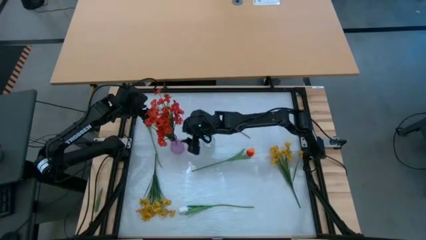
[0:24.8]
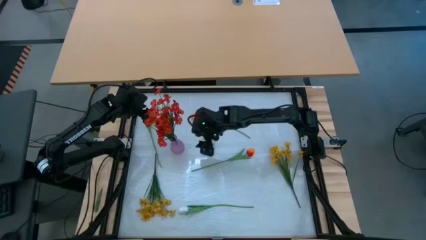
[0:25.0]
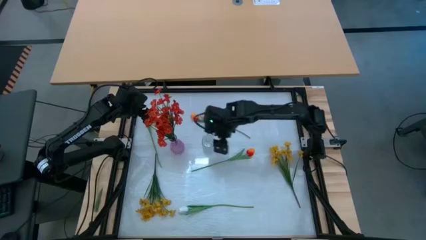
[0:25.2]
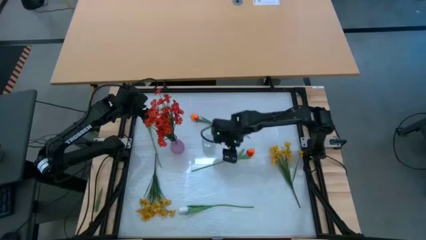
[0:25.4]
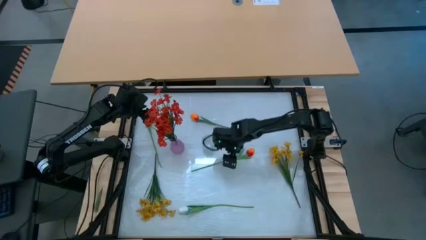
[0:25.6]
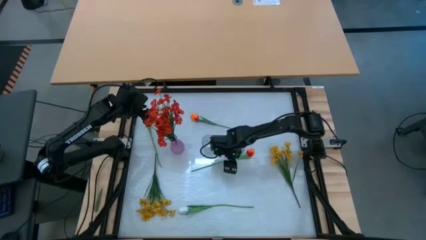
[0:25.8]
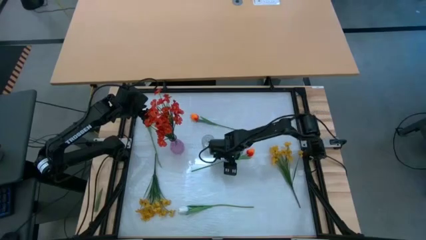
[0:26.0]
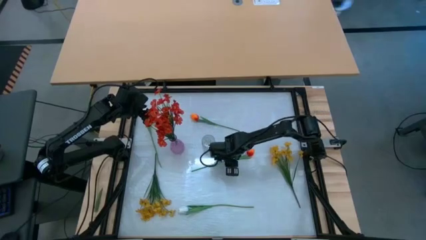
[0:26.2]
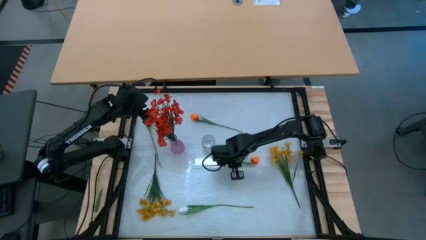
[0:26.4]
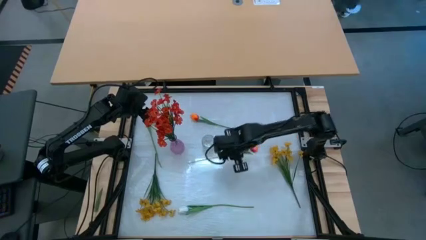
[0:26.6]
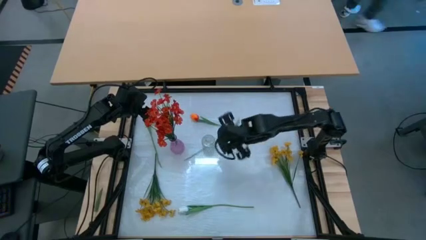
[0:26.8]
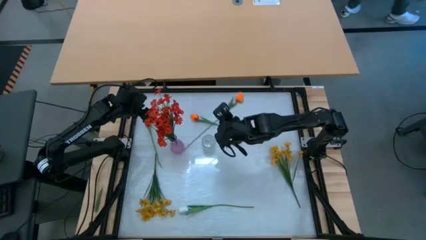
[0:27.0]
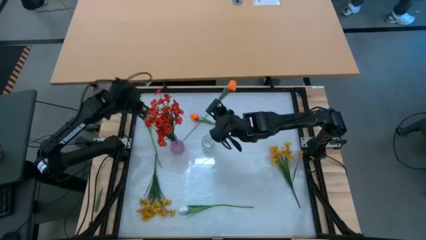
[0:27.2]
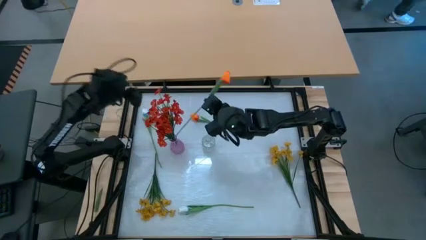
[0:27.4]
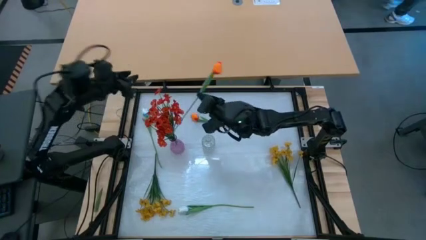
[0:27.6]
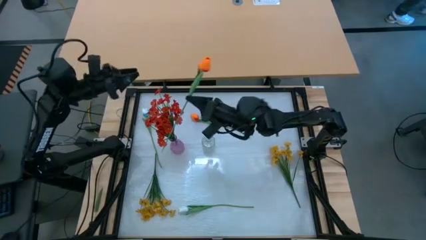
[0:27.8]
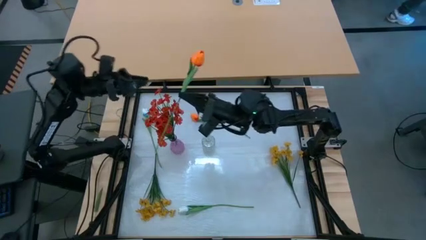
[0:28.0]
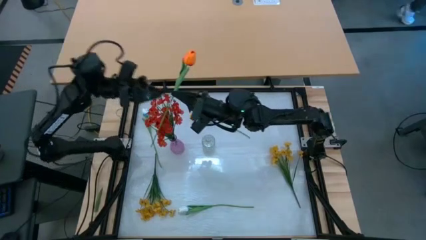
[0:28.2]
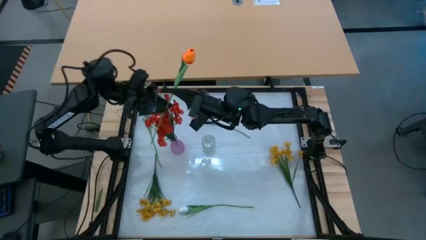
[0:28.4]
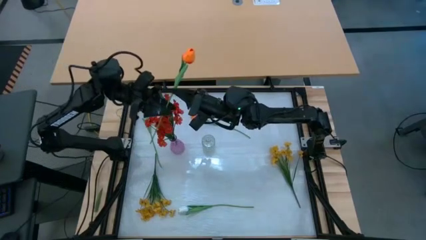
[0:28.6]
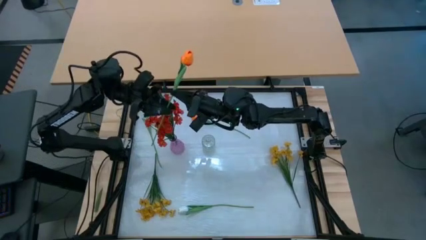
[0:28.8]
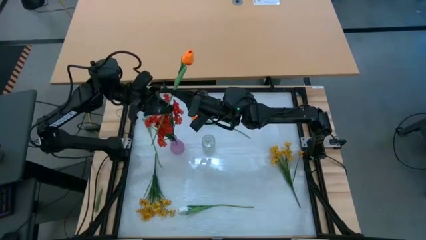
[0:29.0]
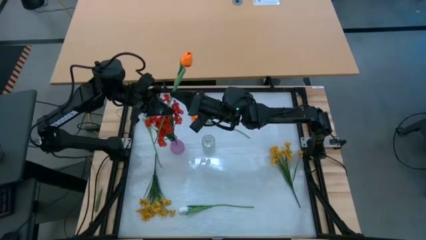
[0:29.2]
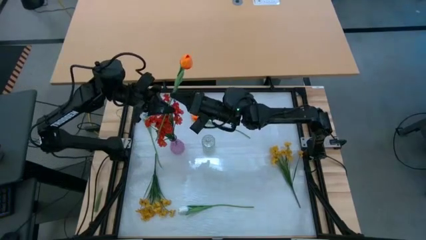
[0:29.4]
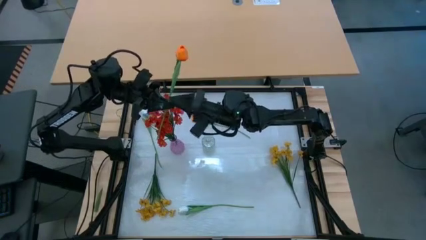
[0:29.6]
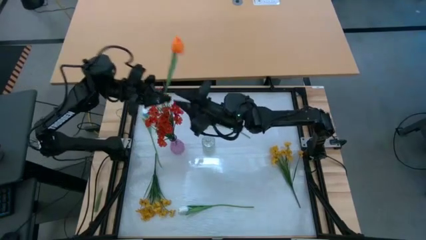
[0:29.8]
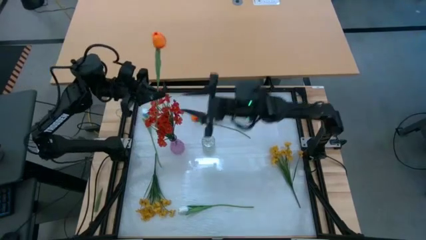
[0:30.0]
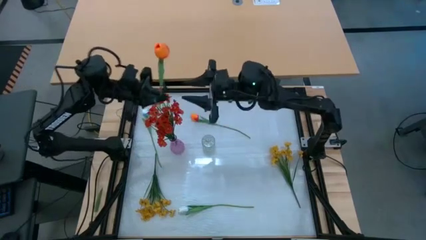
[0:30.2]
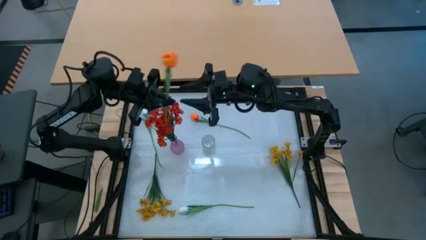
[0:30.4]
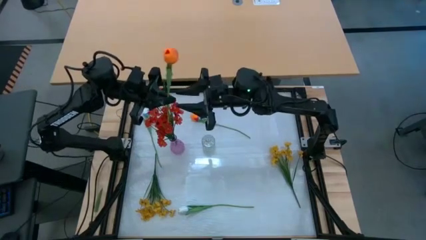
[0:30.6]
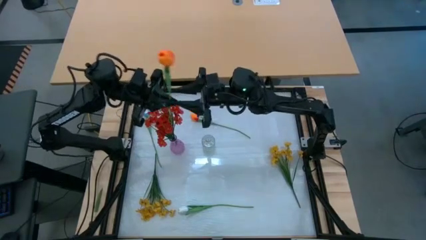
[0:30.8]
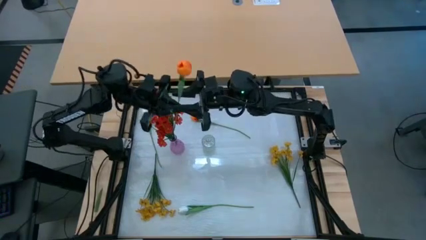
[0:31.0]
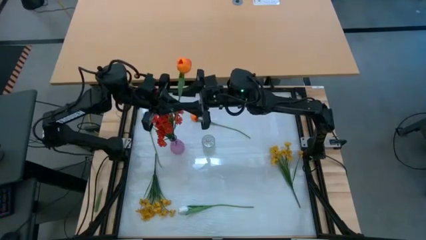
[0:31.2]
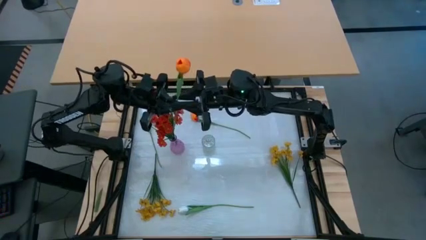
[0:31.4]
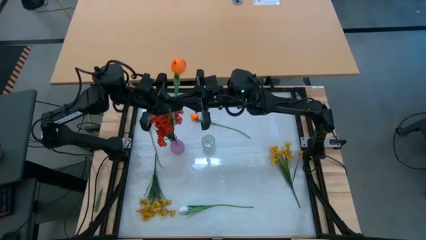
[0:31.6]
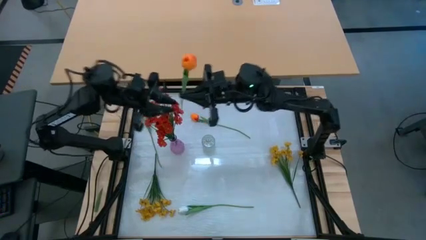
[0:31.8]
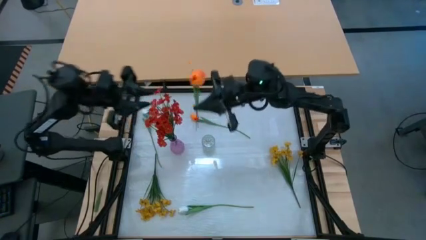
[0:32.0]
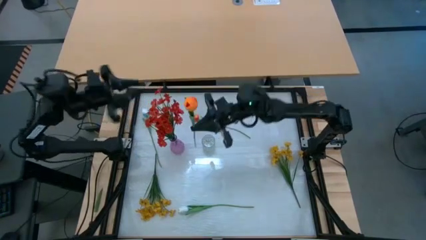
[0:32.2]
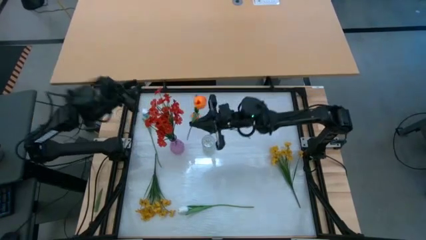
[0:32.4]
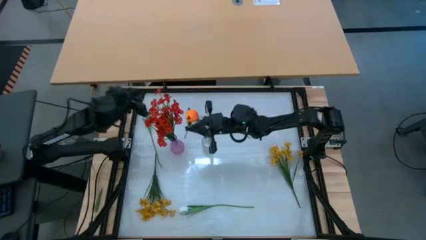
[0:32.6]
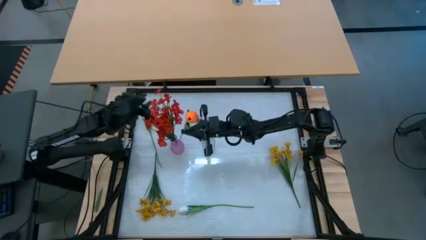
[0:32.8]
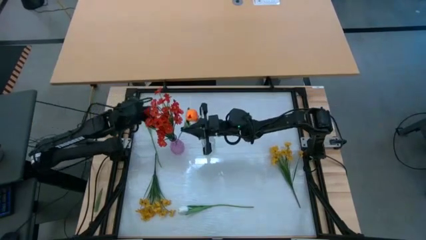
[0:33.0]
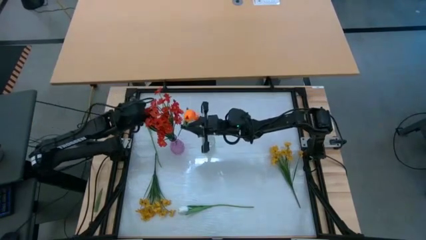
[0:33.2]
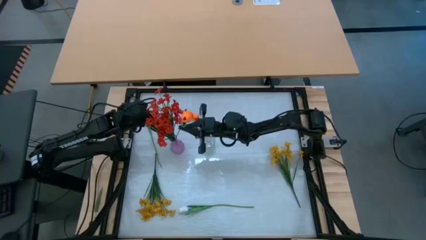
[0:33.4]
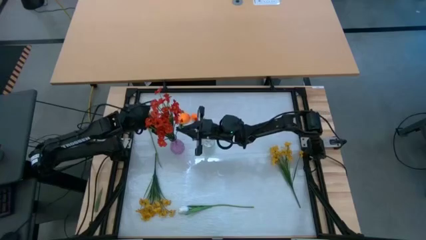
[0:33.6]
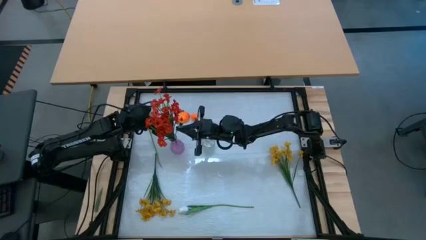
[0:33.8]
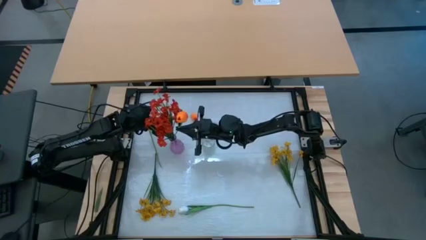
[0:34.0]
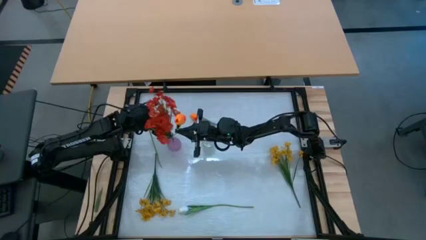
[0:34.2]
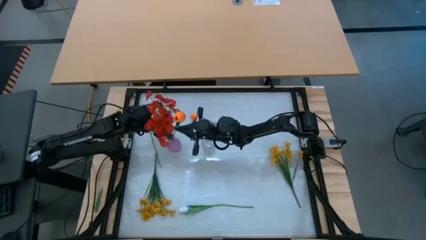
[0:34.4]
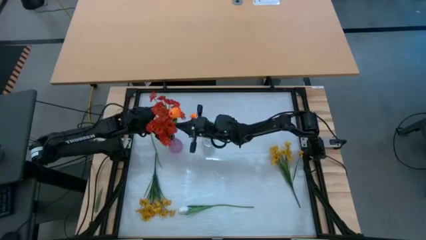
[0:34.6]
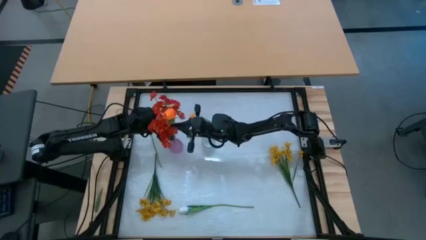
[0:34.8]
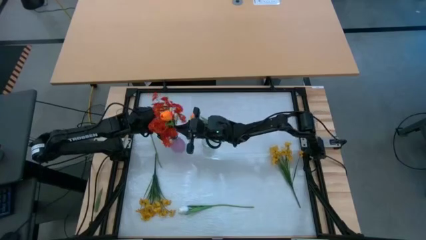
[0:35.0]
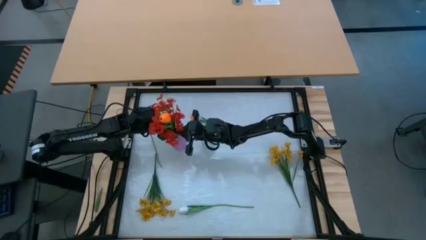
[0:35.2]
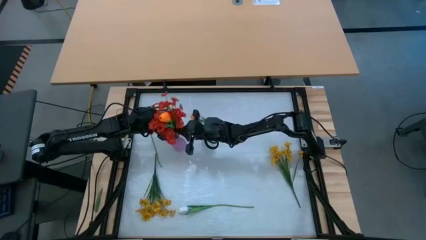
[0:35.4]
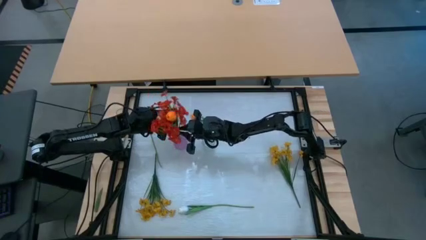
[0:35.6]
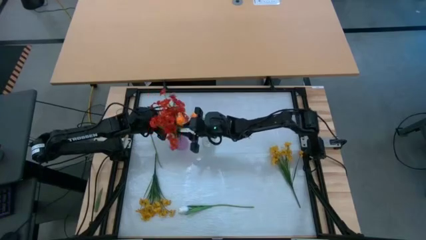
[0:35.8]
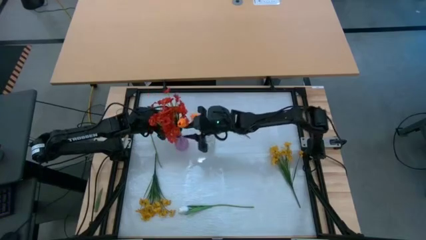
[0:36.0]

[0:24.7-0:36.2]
Task: Sort flowers into vase by color
Put the bottom orange tulip into the violet vase
